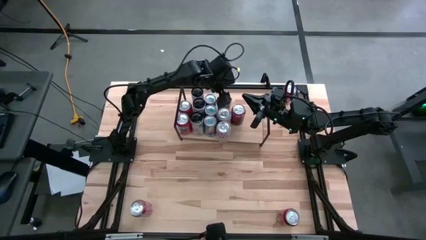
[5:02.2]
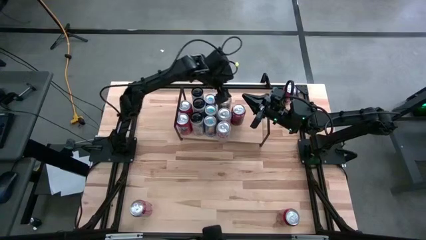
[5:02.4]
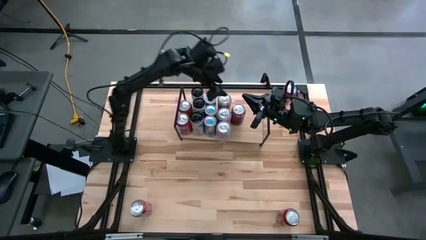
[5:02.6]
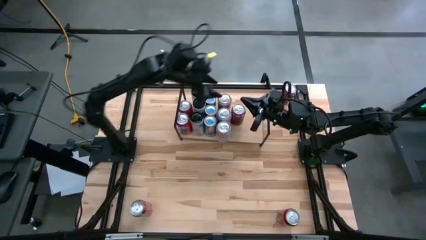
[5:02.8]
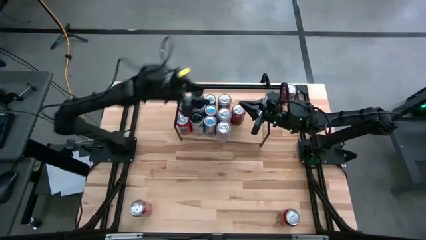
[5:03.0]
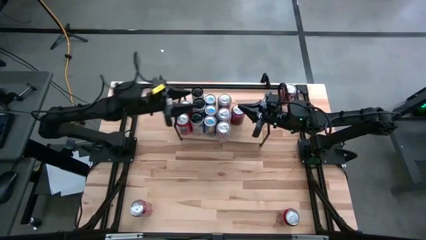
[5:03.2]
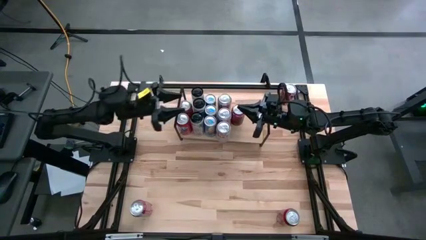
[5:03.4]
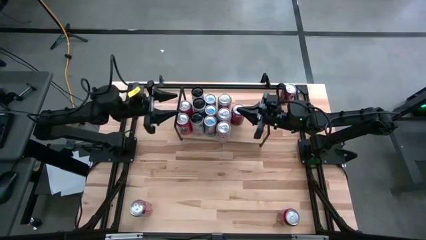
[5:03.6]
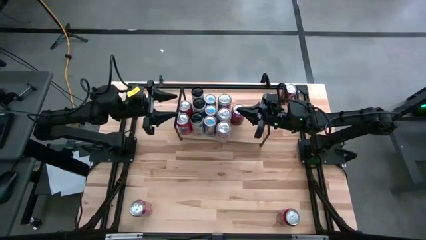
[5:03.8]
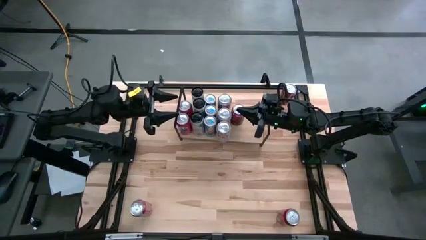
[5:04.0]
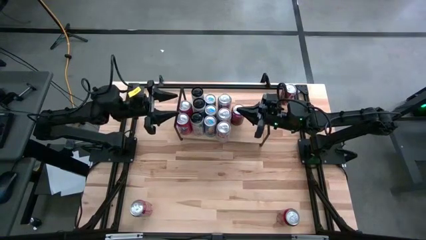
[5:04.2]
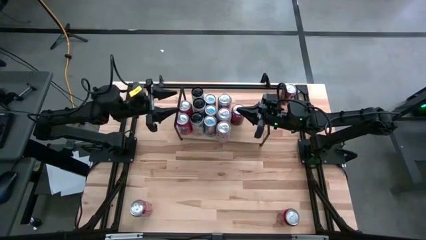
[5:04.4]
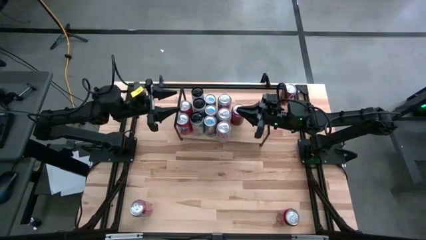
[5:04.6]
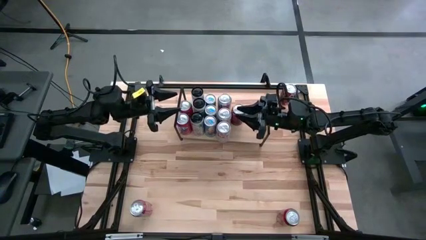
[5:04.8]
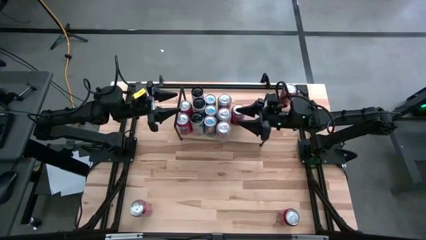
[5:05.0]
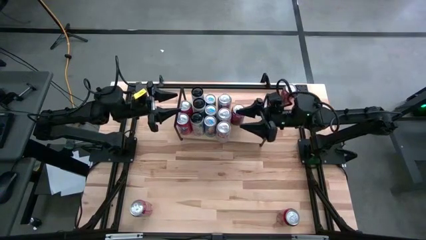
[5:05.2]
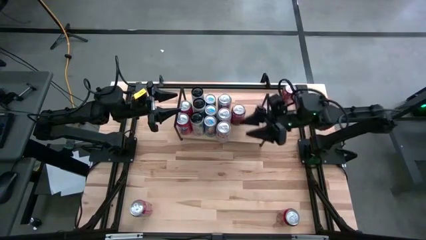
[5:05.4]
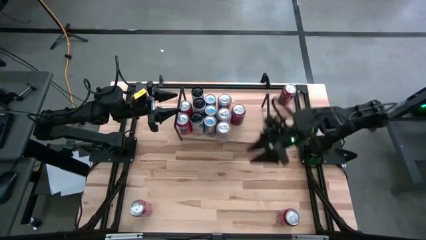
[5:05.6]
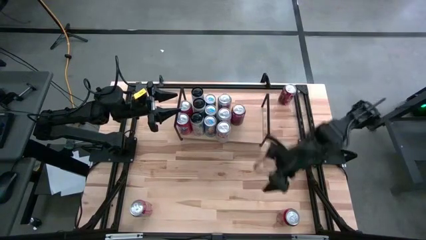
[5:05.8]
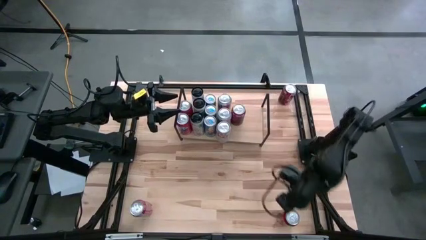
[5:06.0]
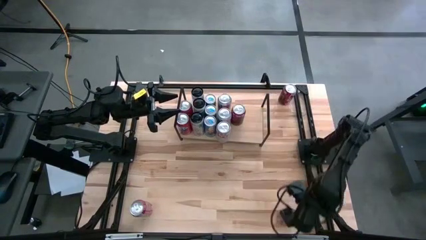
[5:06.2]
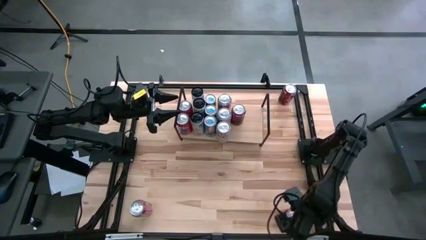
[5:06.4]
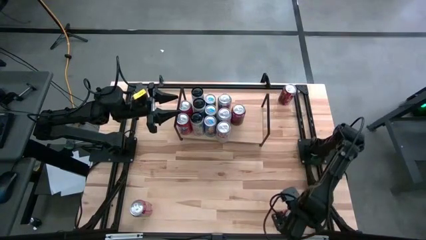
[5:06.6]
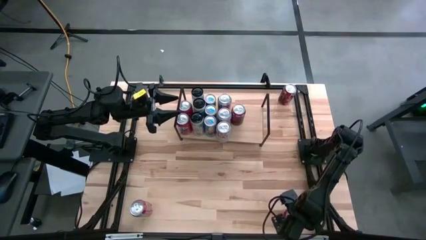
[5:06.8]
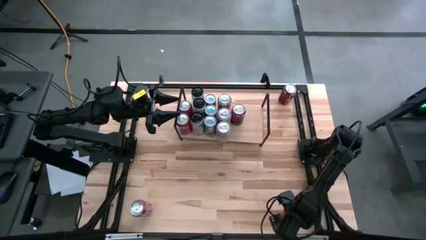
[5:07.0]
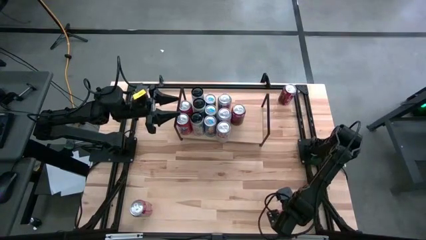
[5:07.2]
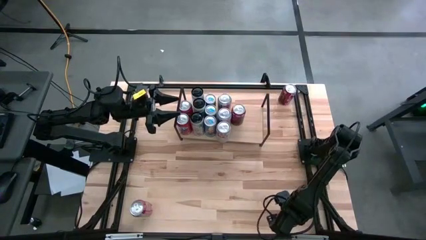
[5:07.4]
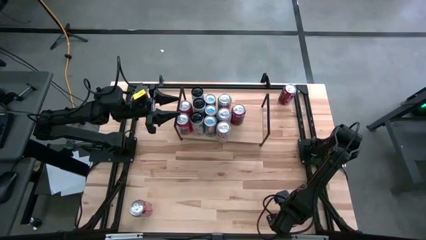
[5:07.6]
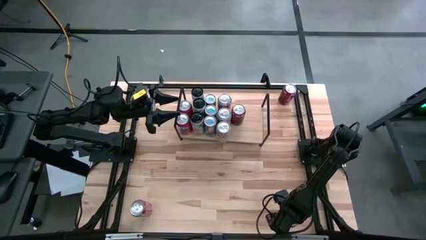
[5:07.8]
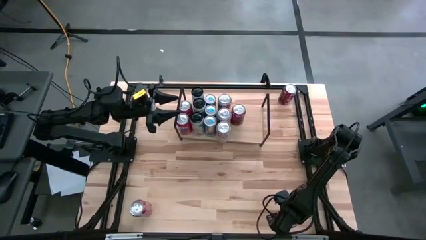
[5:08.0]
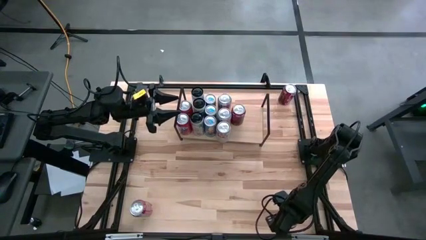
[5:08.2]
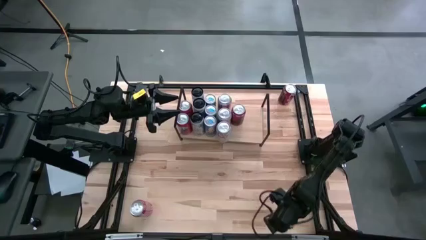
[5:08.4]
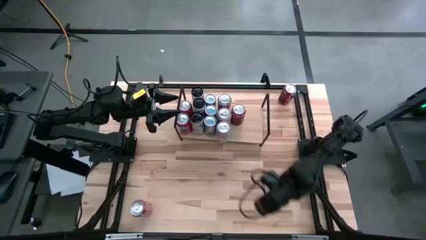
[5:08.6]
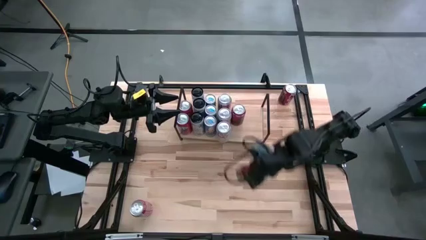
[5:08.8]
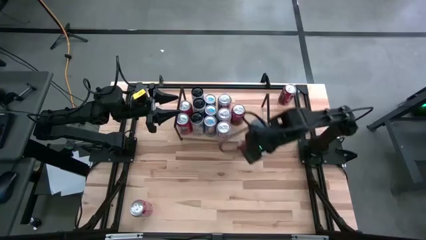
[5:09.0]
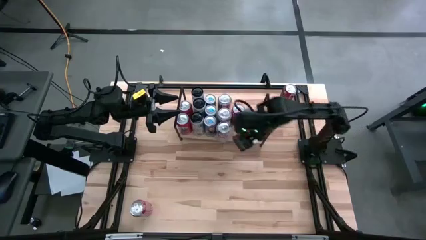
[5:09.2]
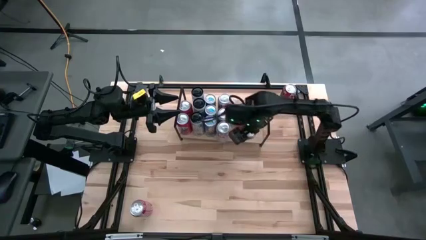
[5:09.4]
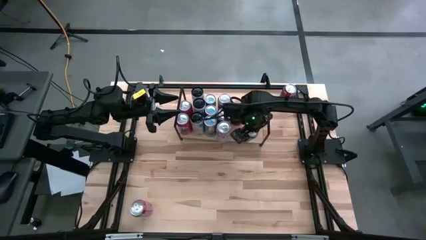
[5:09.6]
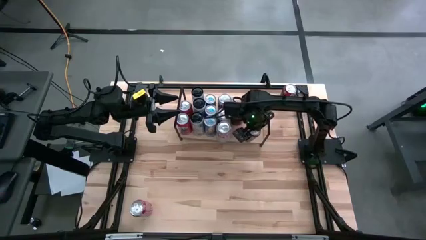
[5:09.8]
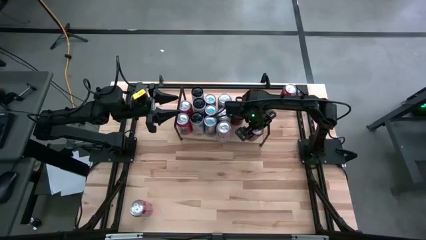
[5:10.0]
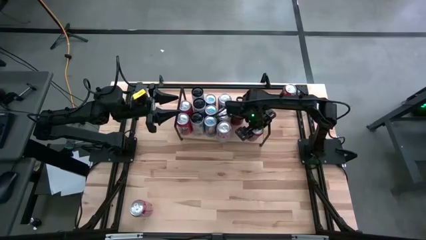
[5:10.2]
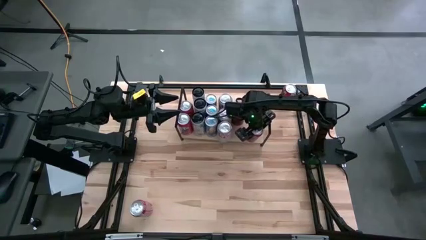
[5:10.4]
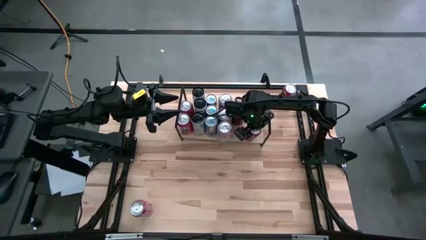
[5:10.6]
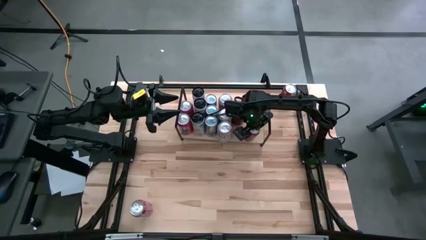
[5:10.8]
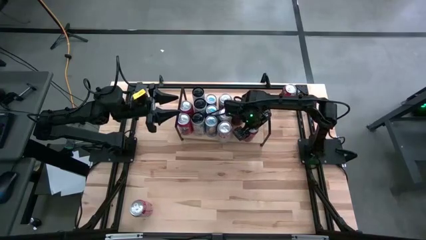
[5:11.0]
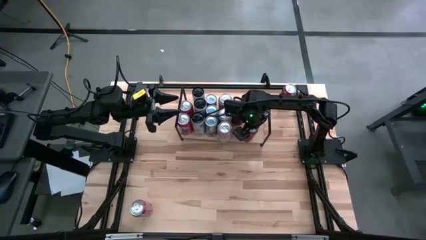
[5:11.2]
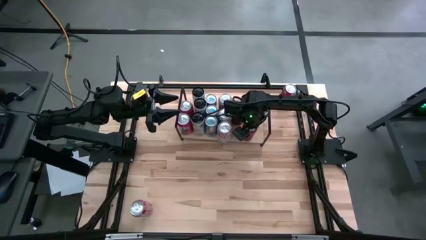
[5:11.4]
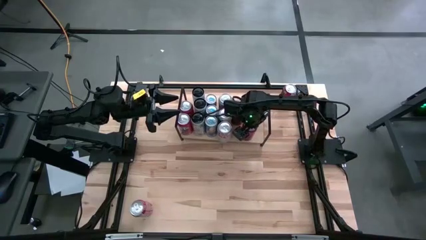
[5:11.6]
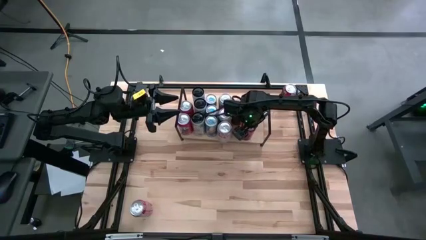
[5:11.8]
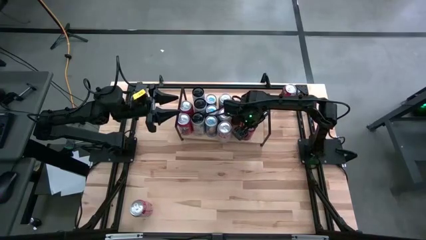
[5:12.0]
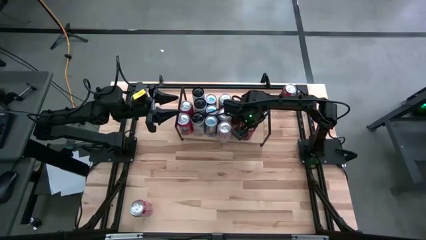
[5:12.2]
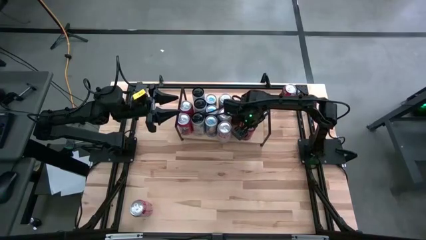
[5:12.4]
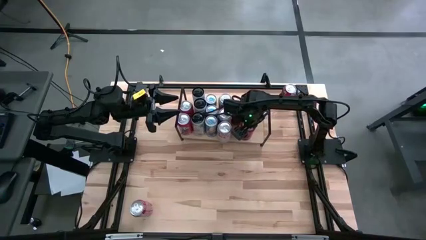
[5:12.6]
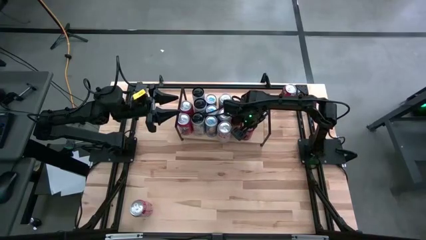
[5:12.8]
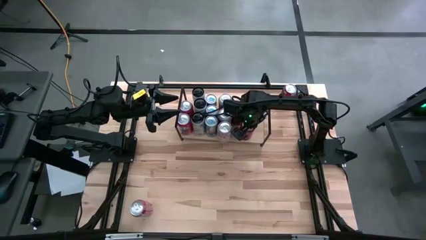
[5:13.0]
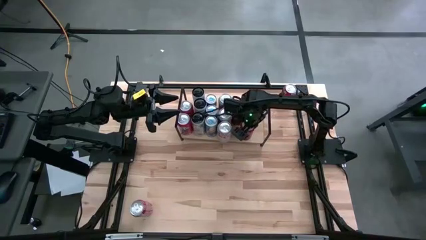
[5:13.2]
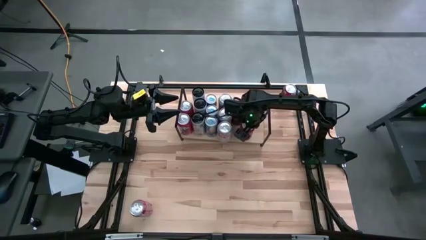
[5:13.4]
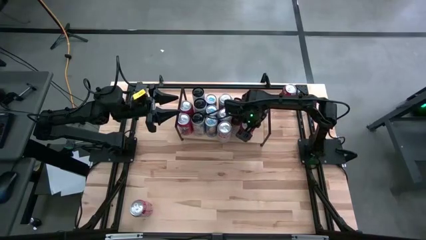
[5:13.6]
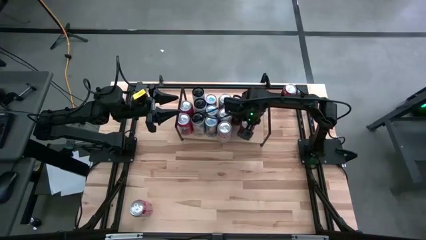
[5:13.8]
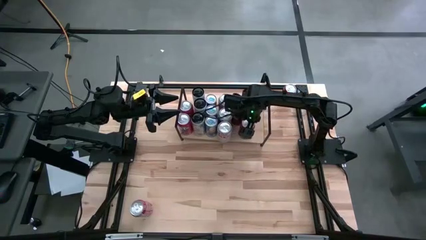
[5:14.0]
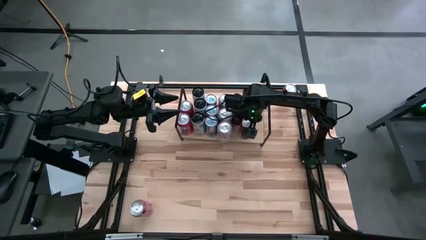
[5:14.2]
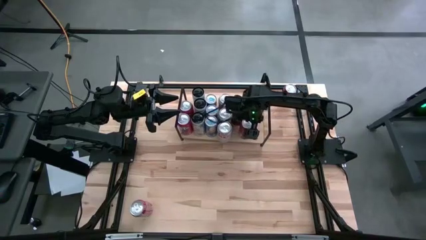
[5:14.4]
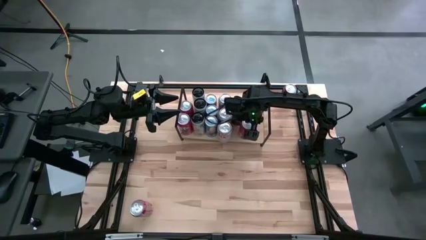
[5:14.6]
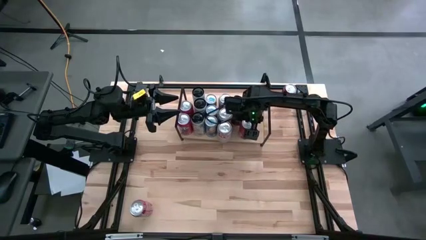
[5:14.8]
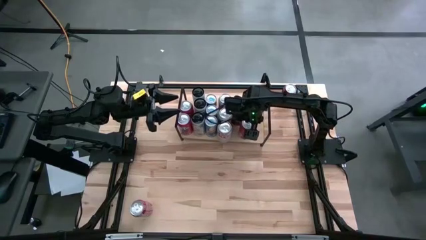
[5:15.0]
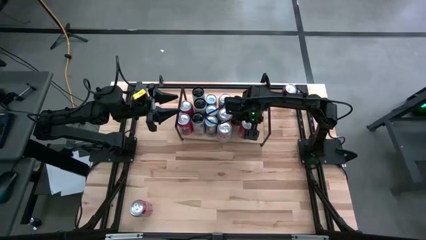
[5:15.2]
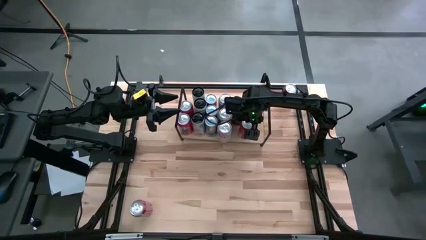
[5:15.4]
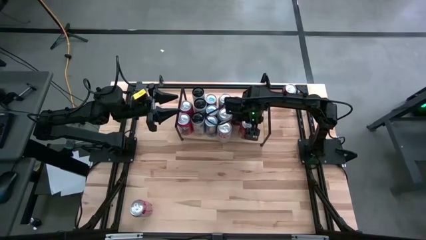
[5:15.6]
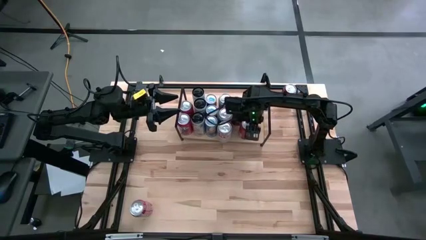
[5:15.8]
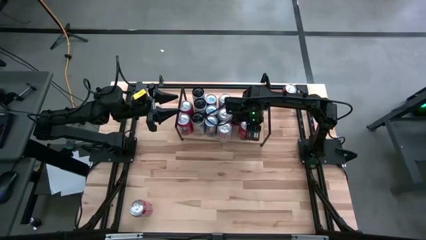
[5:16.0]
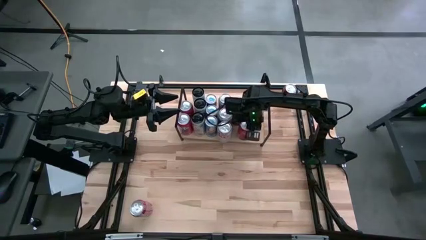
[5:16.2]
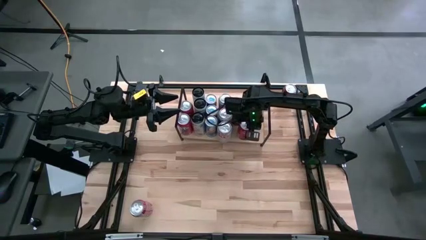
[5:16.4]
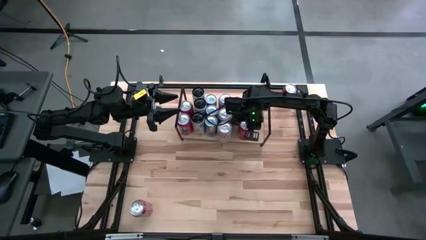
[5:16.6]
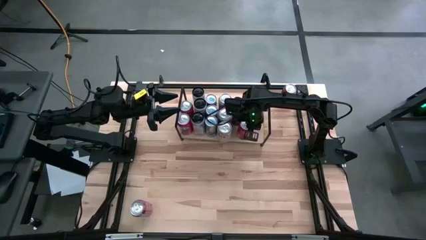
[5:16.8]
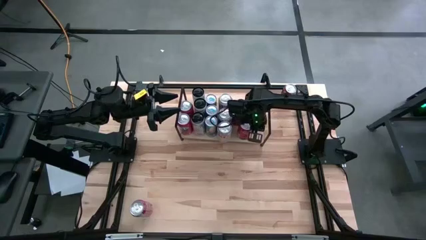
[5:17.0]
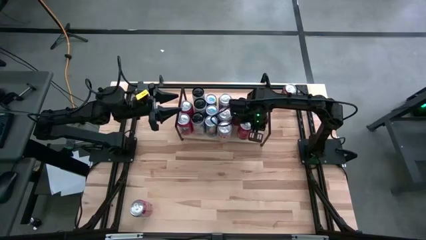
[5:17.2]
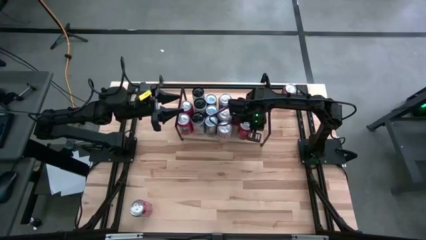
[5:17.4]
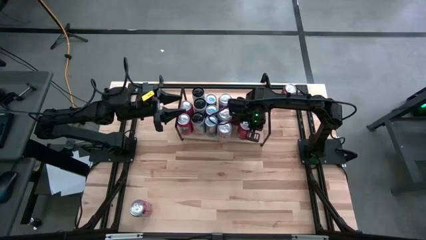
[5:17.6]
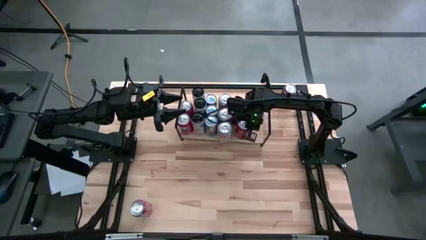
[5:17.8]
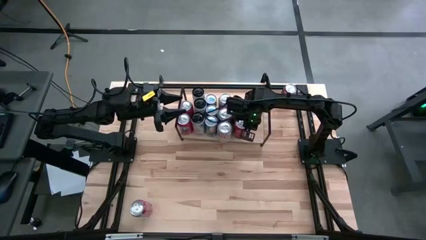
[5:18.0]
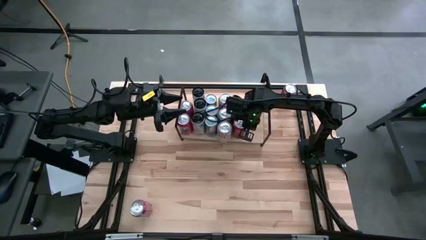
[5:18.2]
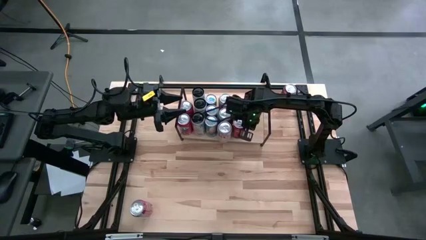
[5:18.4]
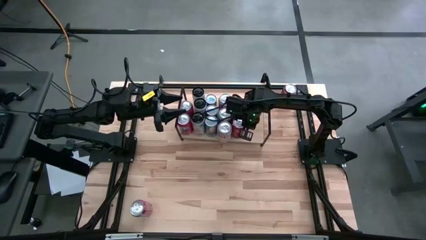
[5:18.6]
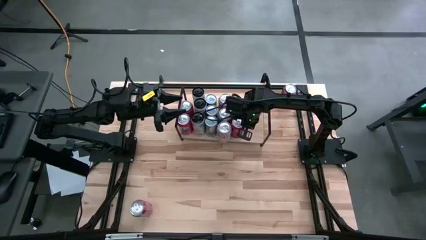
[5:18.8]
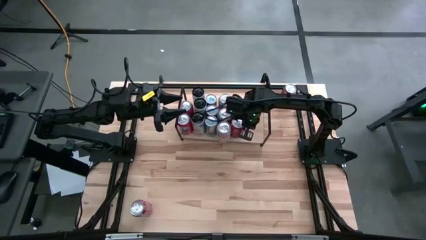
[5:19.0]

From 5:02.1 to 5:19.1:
Task: Place canned beverage on shelf
Put the red and black soda can and align the it with the other red and white soda can on the shelf
